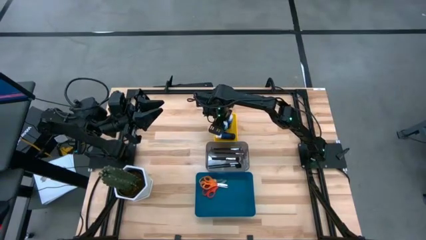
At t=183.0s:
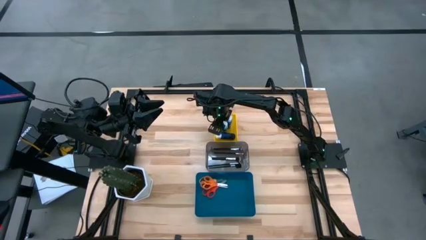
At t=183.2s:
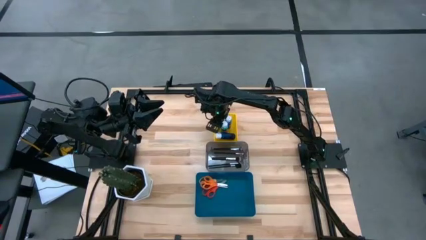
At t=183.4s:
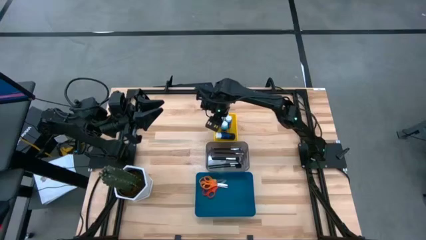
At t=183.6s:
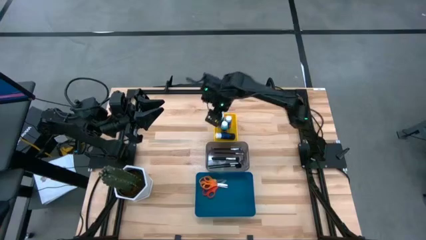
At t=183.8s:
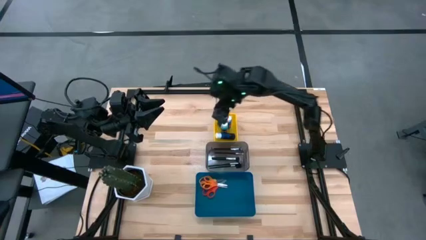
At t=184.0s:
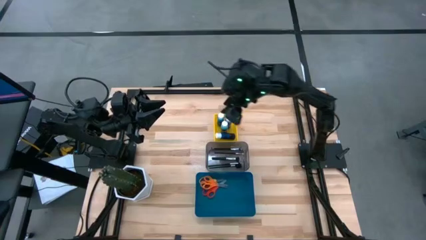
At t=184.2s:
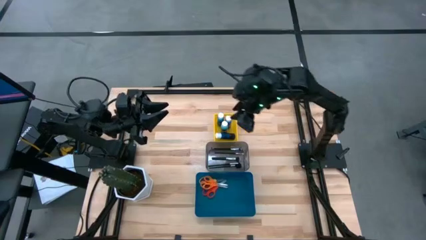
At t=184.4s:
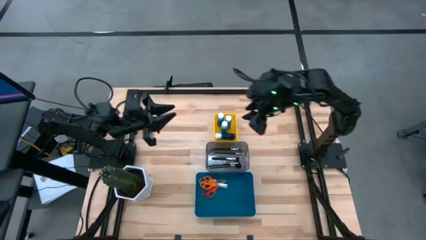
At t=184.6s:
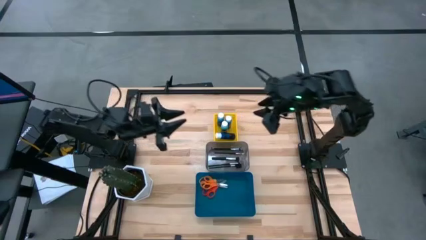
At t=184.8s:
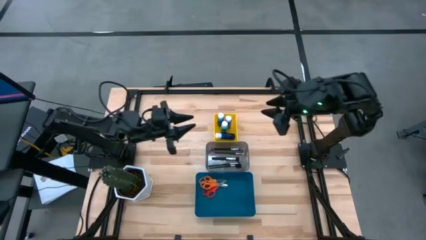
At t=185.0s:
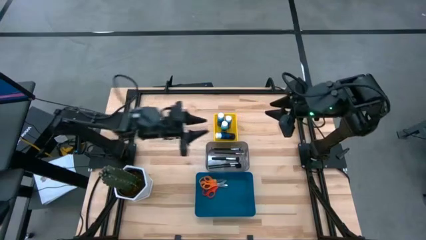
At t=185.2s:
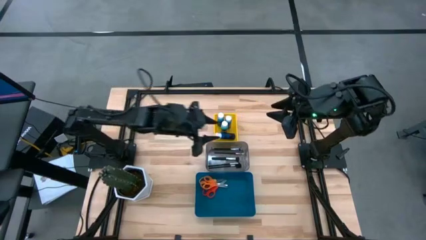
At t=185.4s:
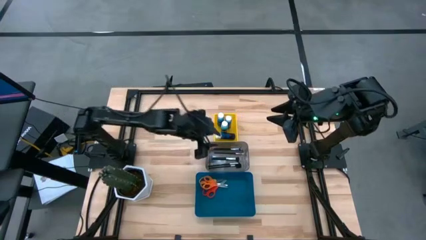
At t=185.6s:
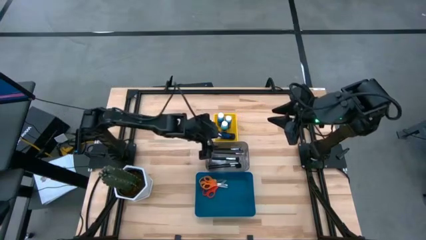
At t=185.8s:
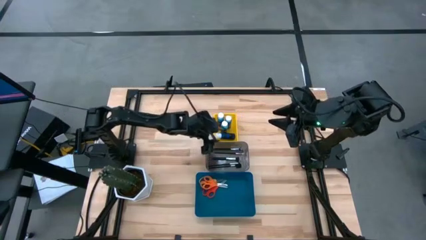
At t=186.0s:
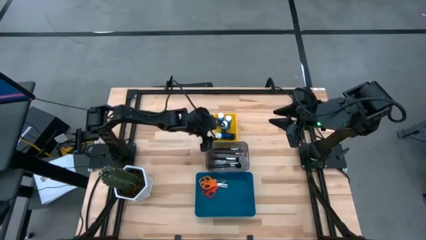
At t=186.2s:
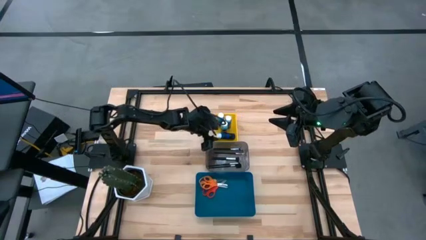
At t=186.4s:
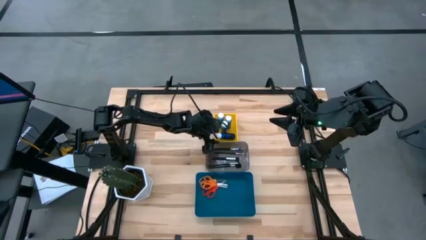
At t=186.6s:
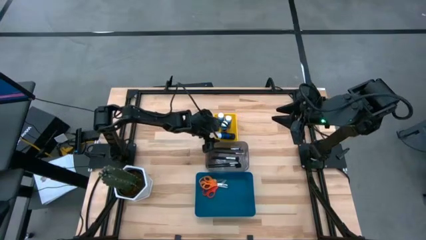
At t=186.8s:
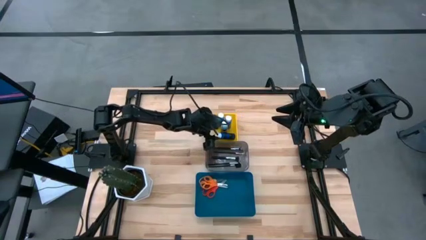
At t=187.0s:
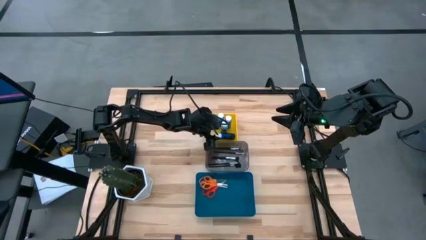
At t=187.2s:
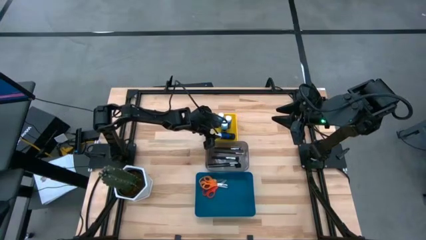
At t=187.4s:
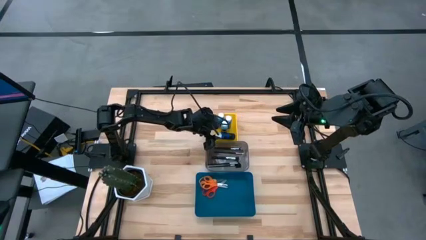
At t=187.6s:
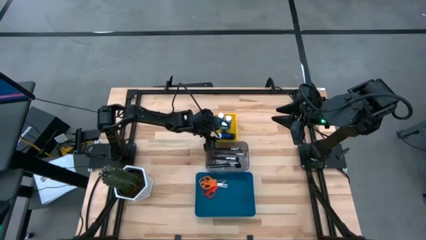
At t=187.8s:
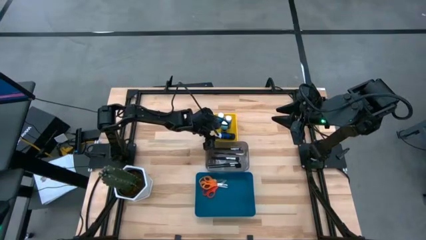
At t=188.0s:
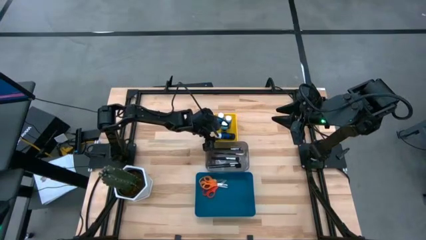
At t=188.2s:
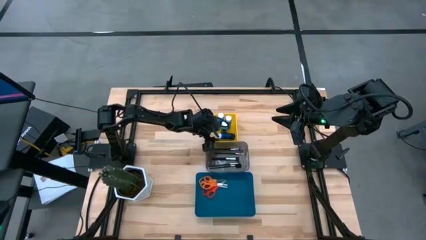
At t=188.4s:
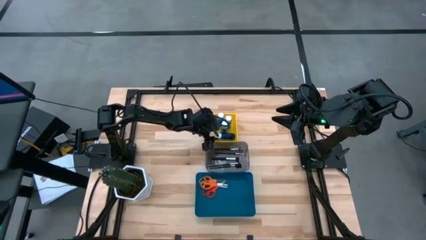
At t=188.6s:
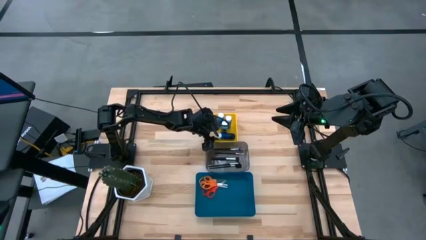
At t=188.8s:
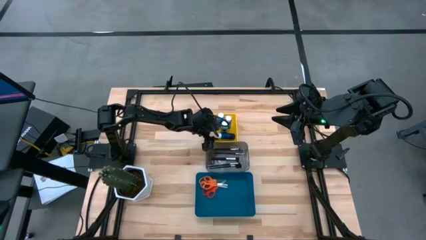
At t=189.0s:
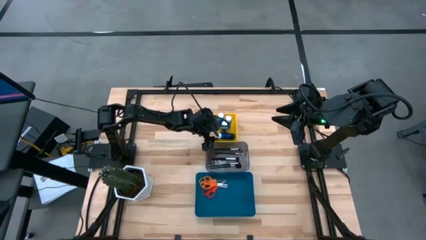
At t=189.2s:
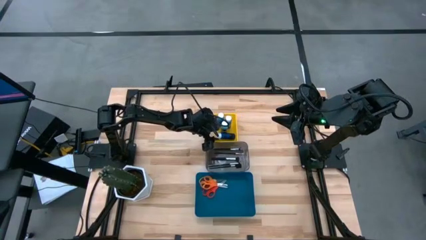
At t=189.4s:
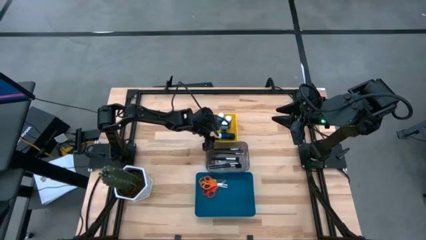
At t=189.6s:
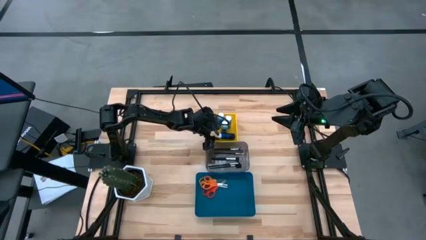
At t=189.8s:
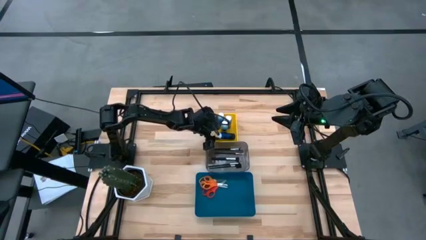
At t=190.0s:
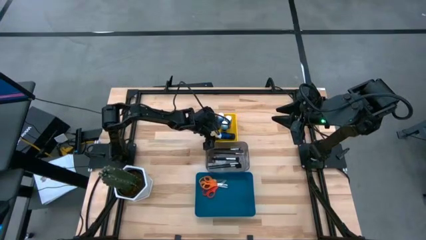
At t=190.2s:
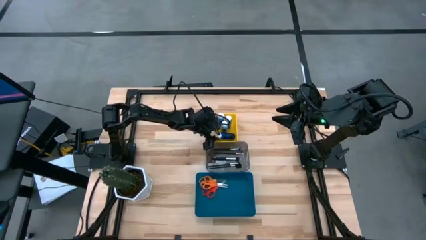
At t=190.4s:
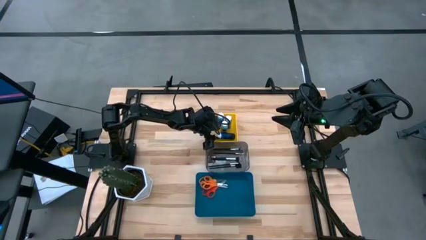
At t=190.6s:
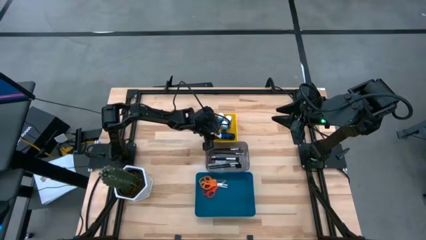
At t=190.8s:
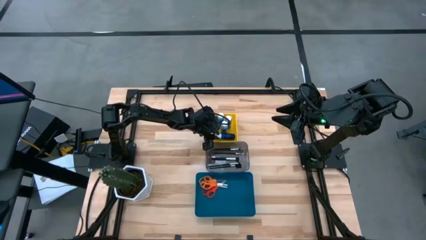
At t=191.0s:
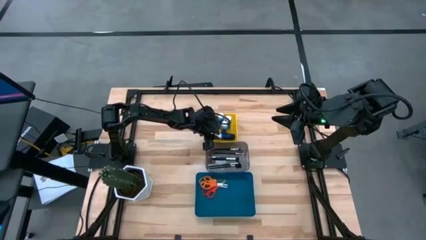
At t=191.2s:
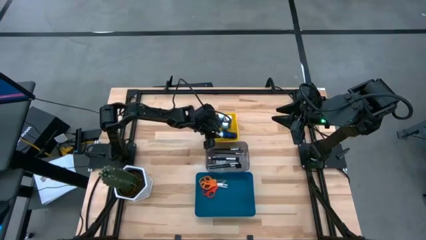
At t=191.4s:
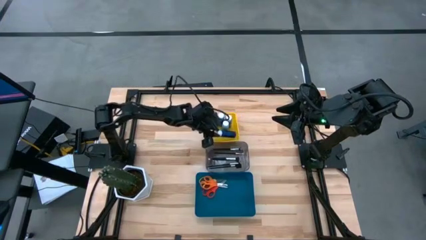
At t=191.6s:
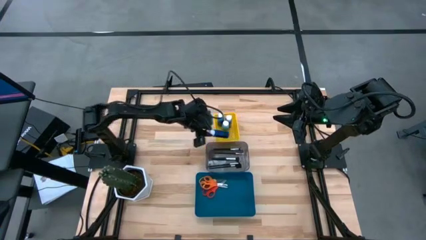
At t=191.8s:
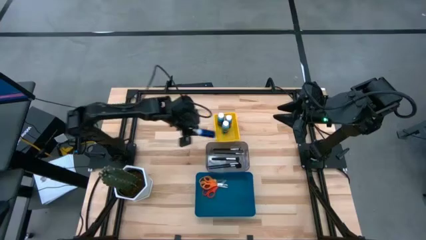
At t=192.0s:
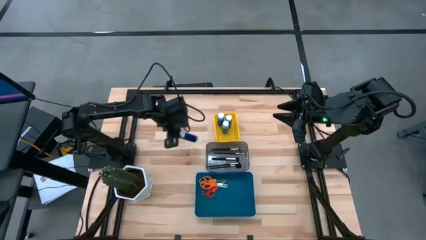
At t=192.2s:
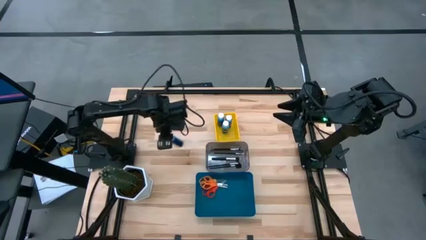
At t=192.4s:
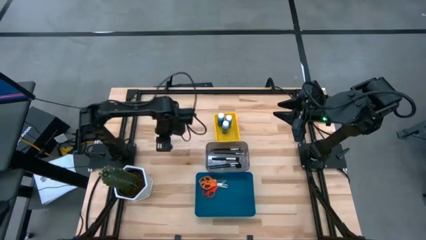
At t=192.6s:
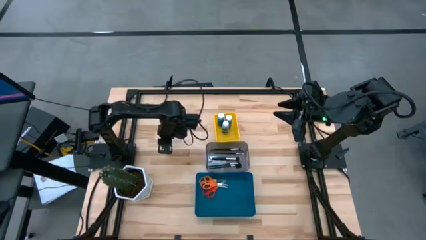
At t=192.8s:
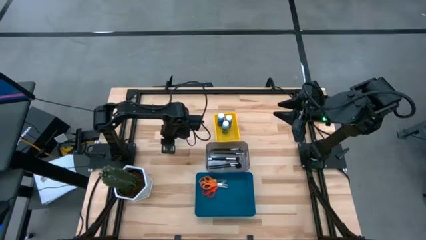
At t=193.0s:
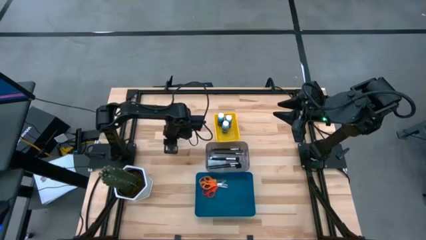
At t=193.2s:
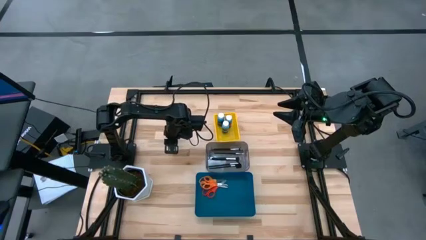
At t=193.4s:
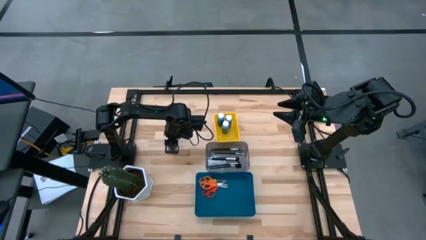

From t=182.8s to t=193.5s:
Task: Pick & Place Paint Supplies
Put the blue paint bottle into the yellow bin
